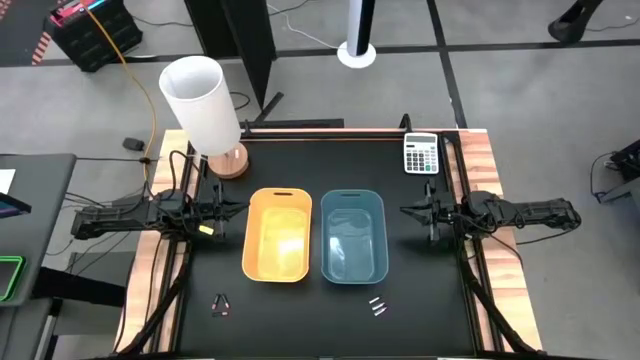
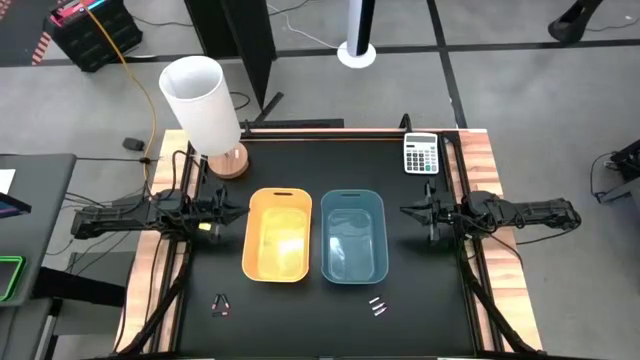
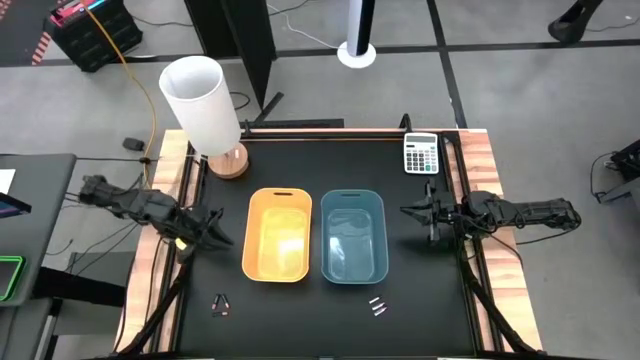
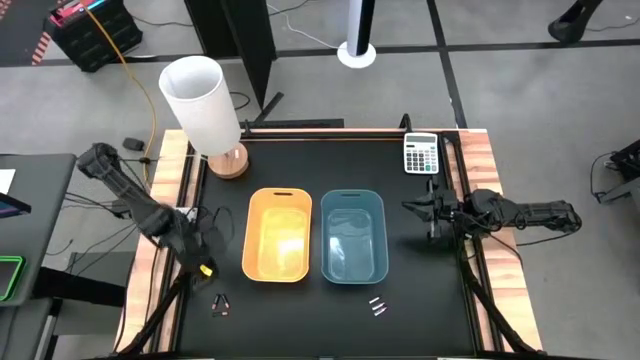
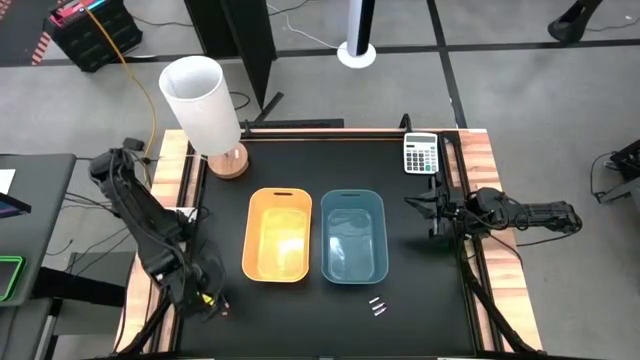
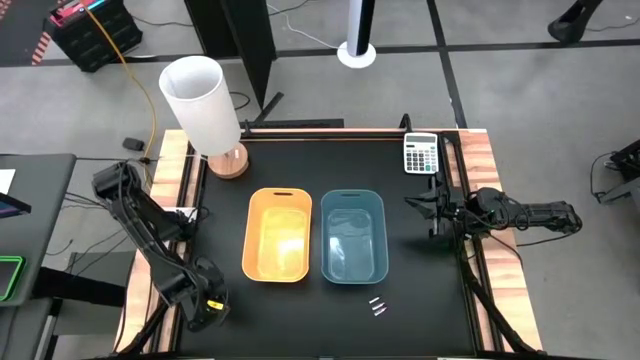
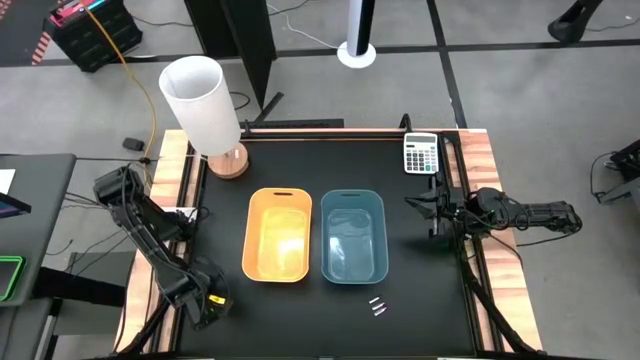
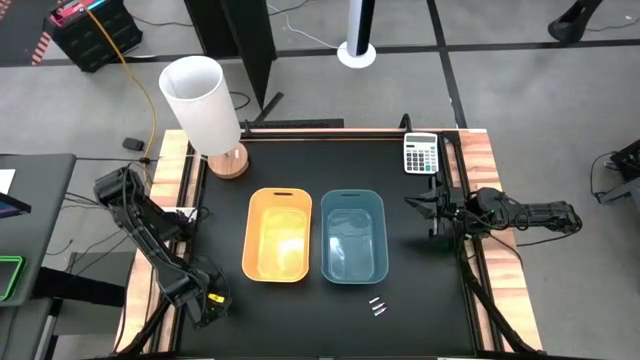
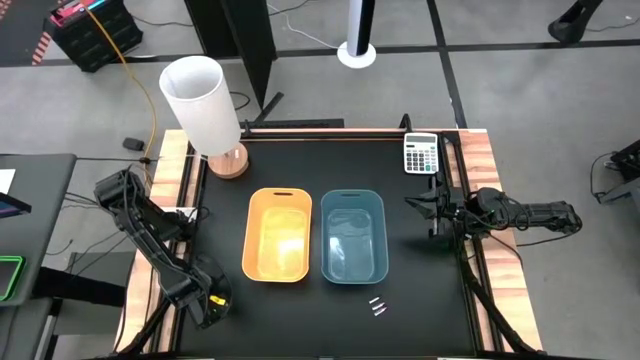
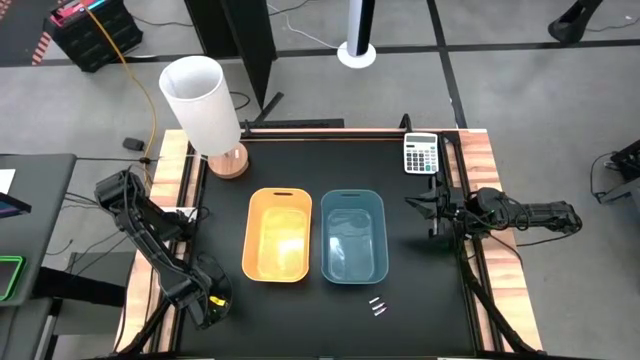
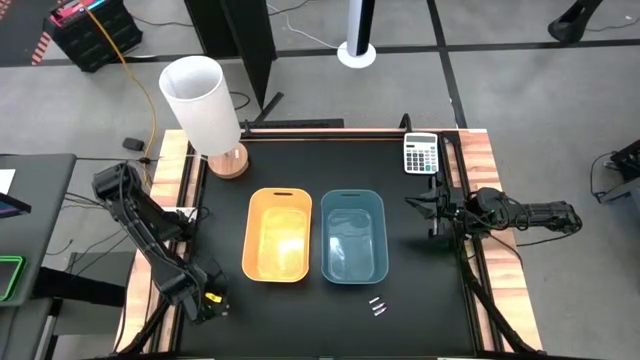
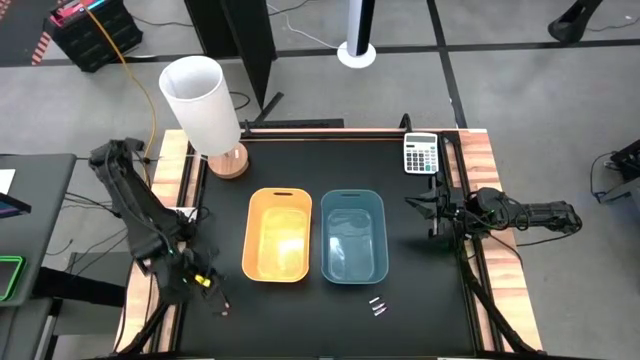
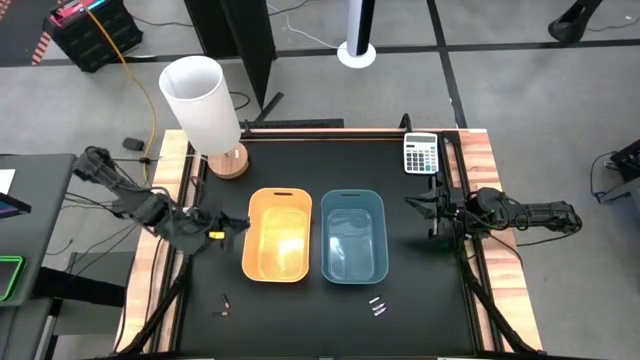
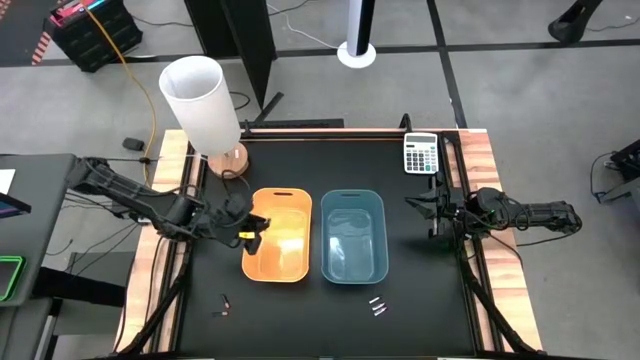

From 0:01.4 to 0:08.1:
Task: Sort batteries
Put the left black battery into the yellow bin

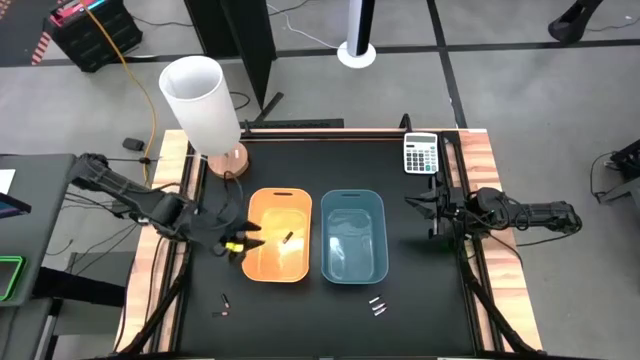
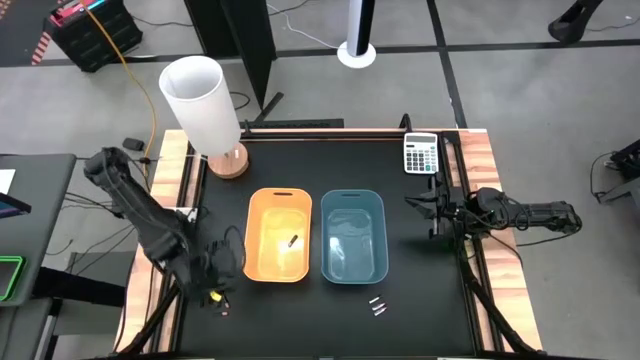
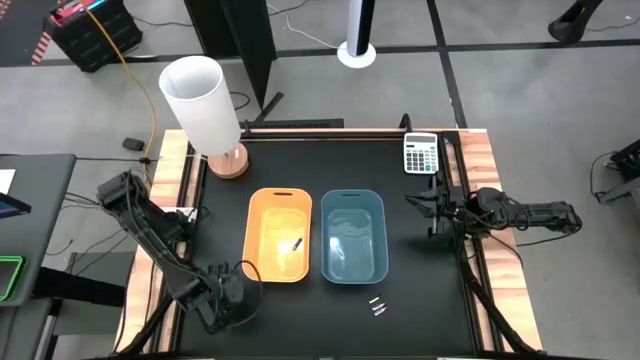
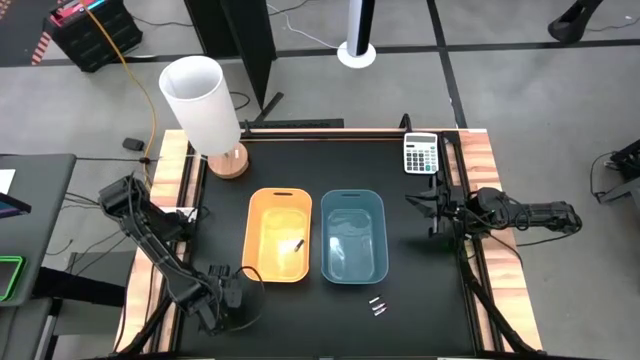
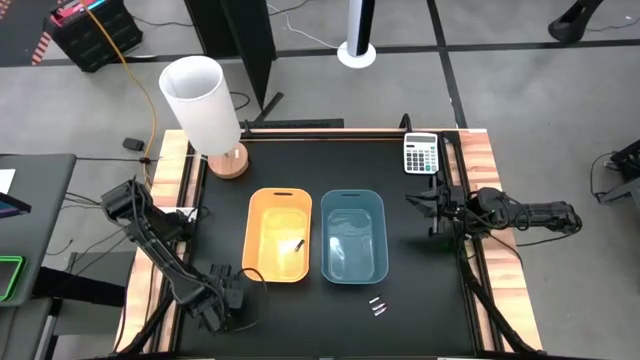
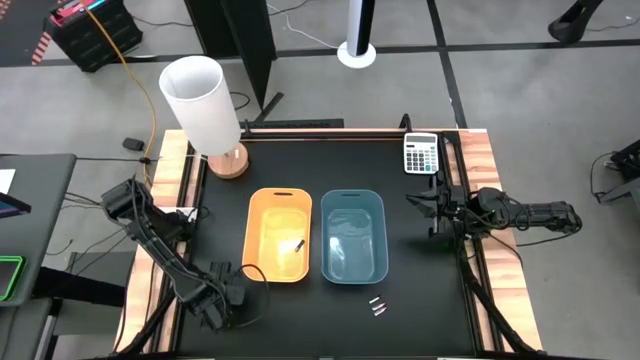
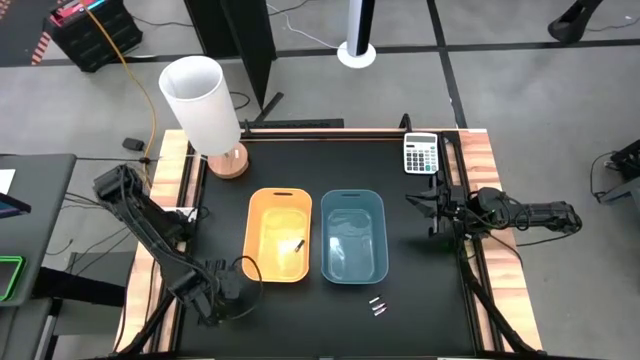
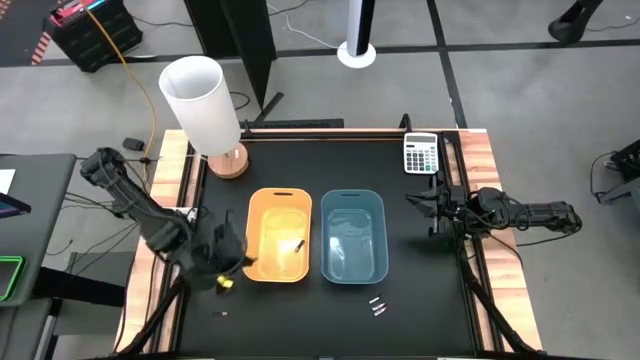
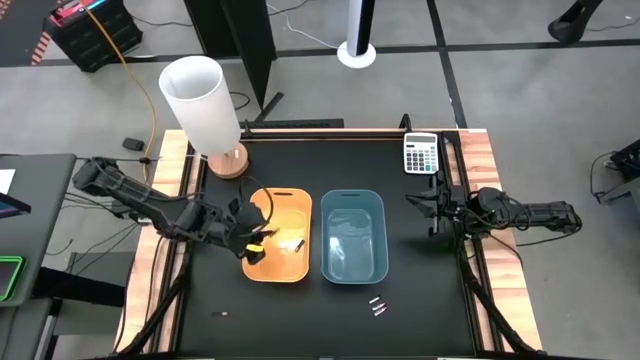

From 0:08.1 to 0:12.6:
Put the top black battery into the yellow bin

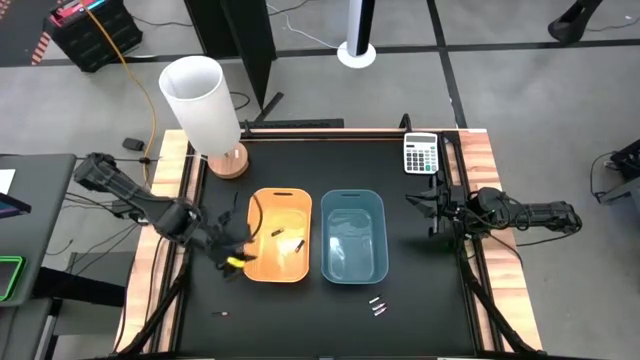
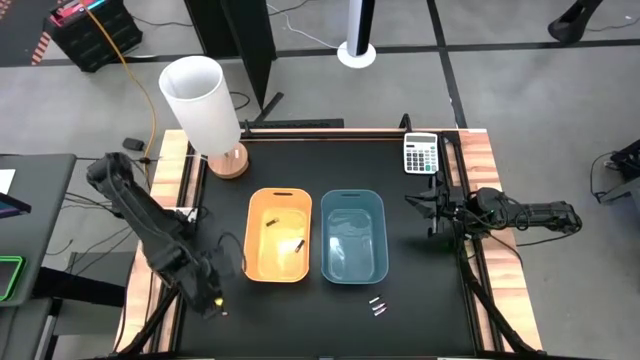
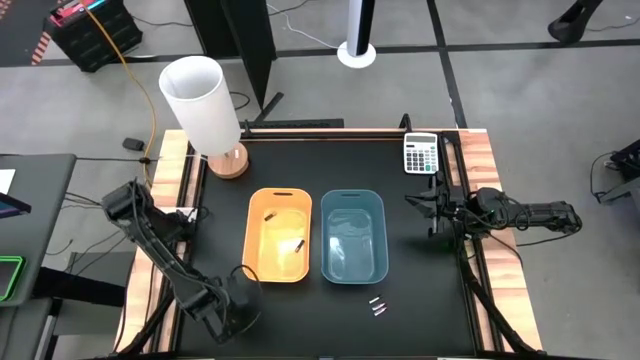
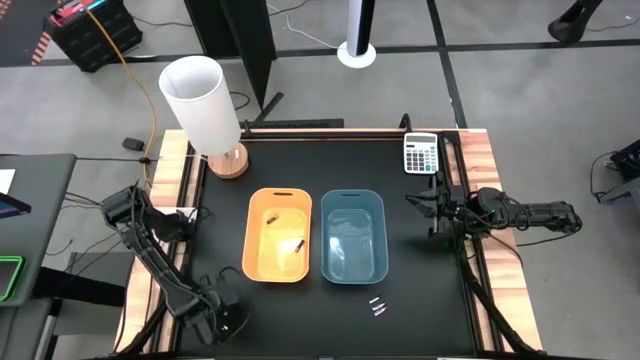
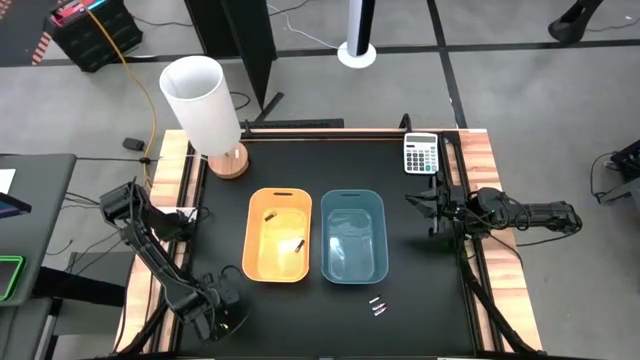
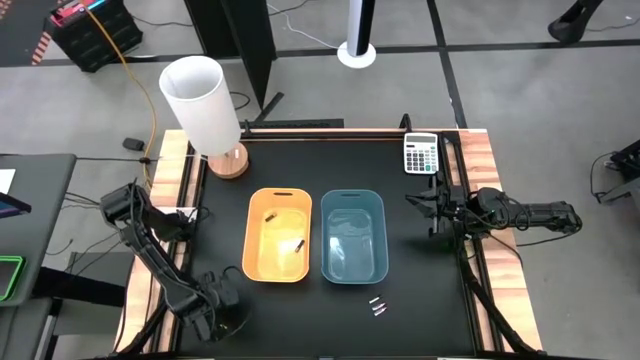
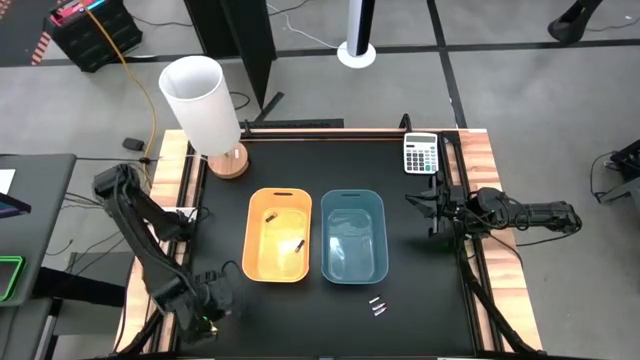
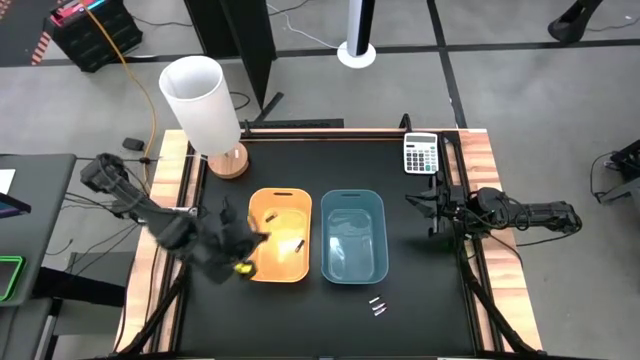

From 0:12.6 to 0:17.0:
Put the black and into the yellow bin

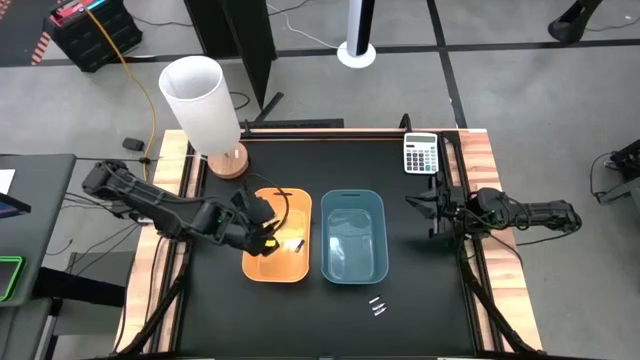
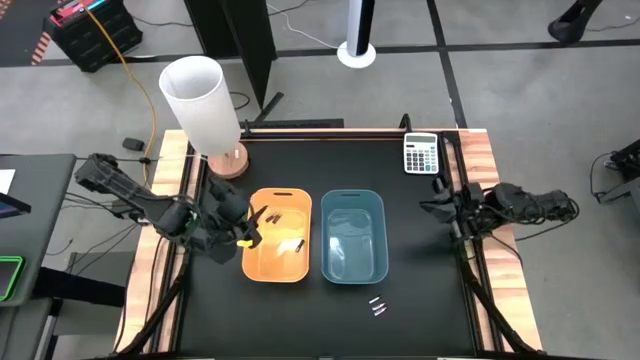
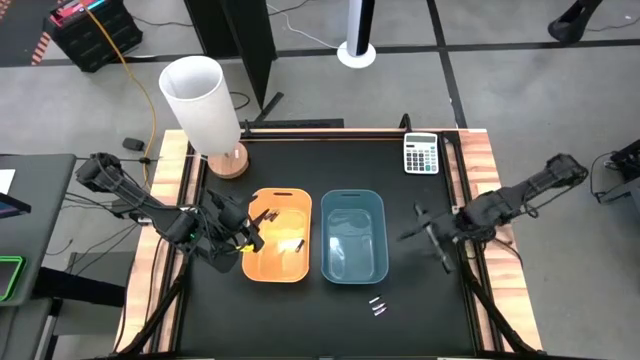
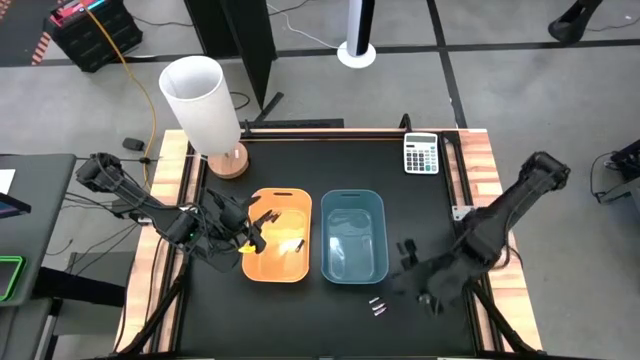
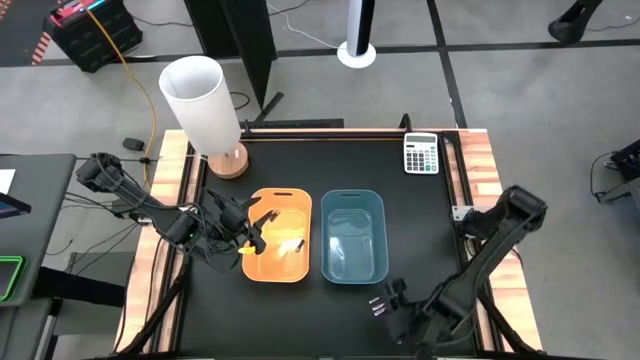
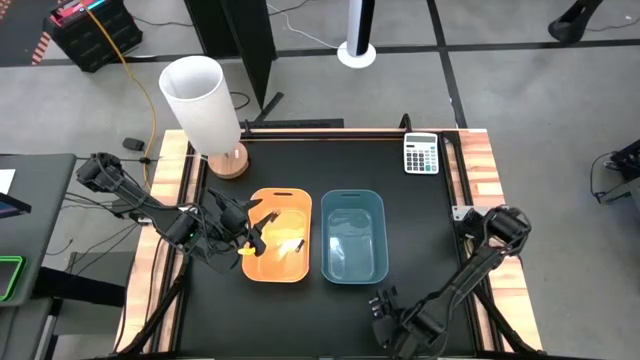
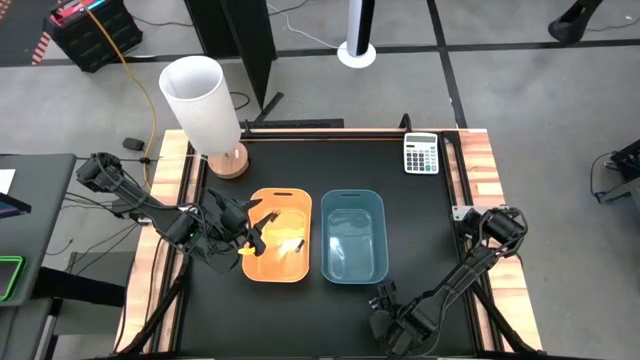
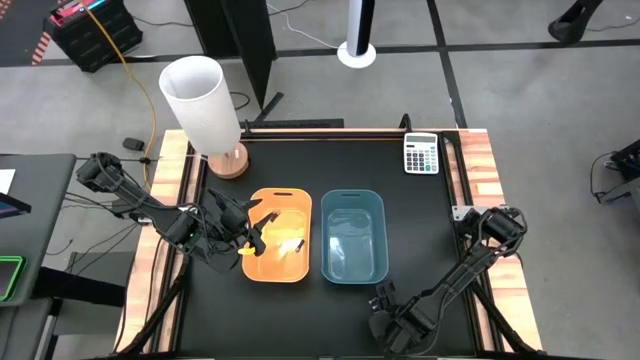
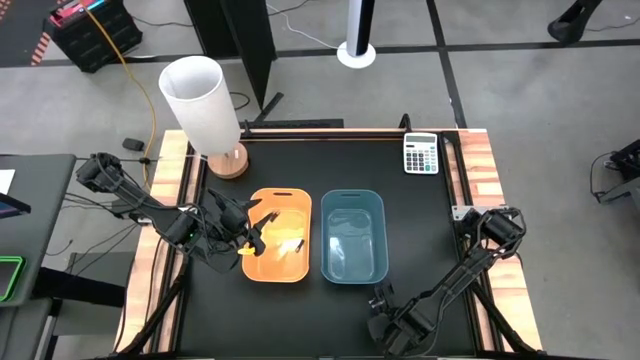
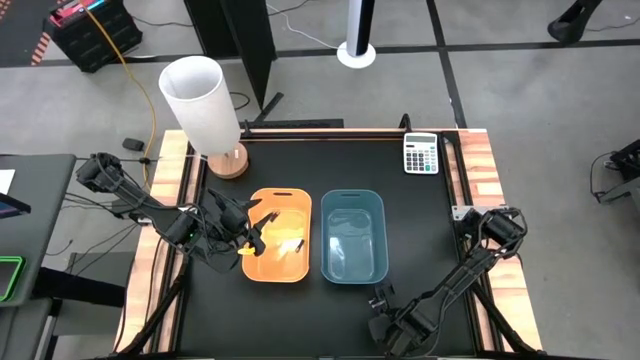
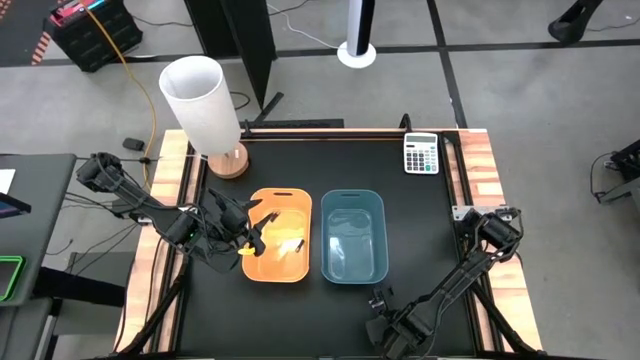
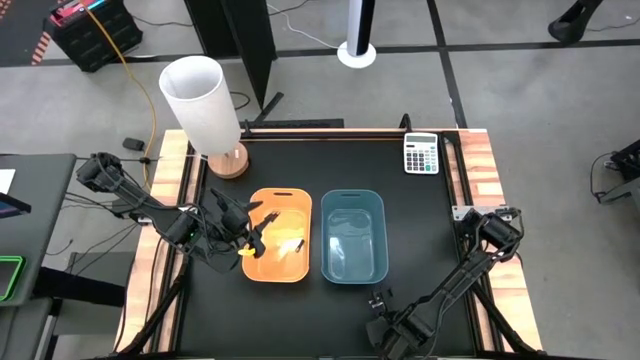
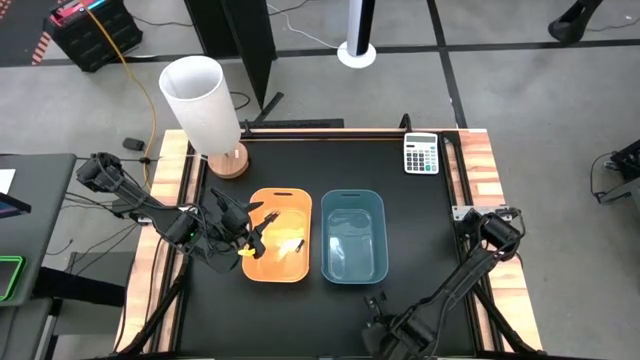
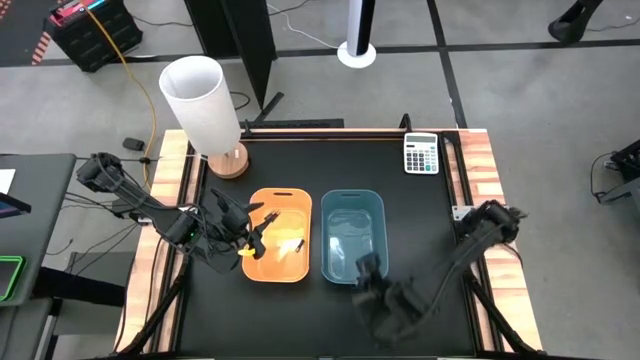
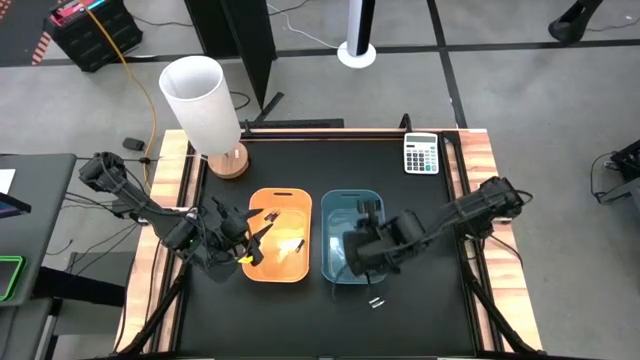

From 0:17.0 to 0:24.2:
Put the bottom silver battery into the blue bin
